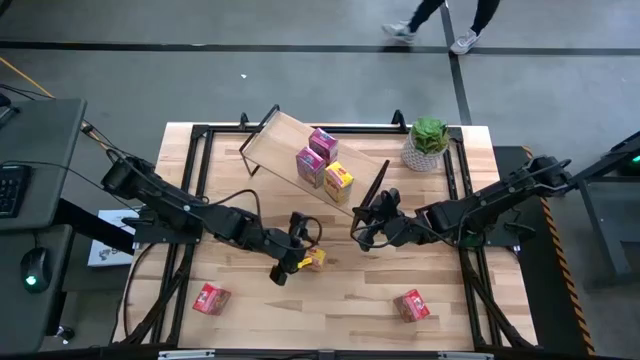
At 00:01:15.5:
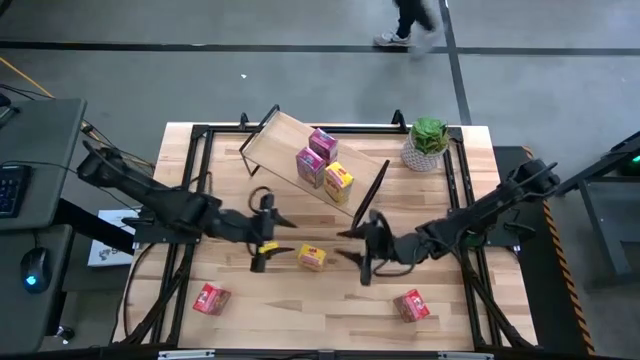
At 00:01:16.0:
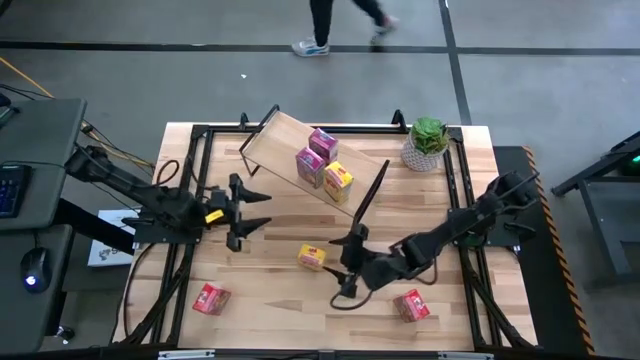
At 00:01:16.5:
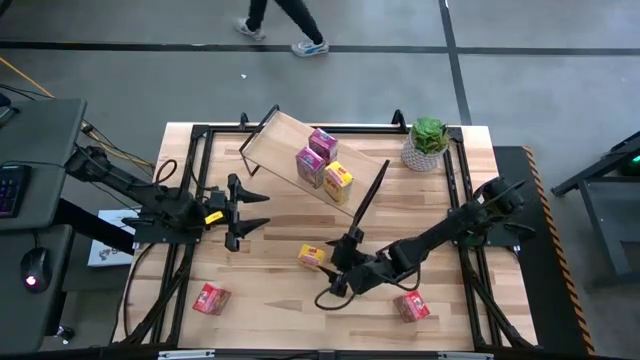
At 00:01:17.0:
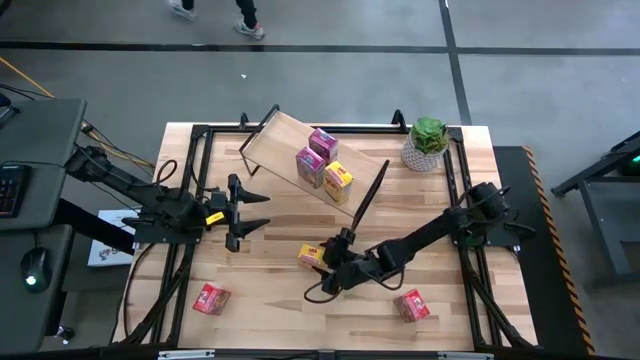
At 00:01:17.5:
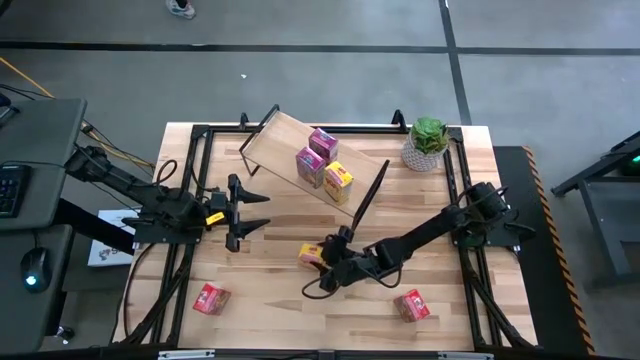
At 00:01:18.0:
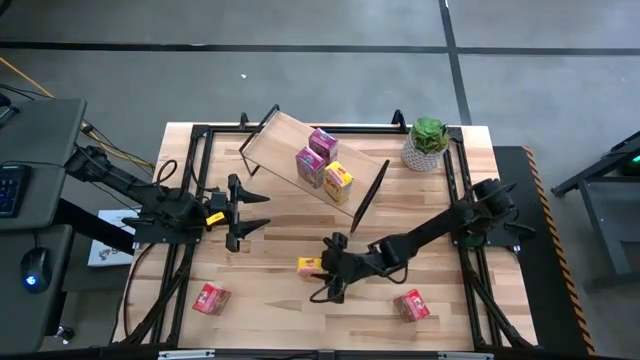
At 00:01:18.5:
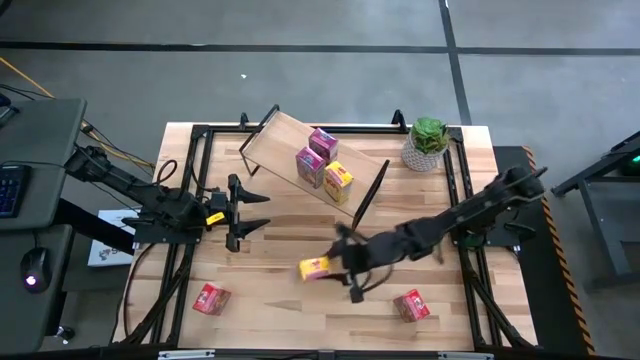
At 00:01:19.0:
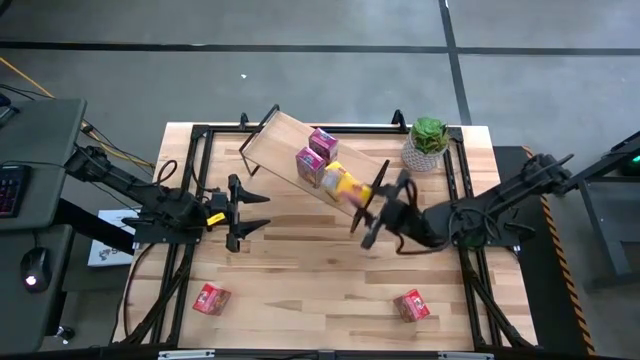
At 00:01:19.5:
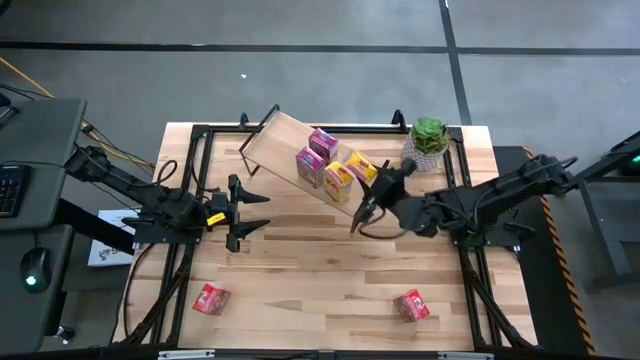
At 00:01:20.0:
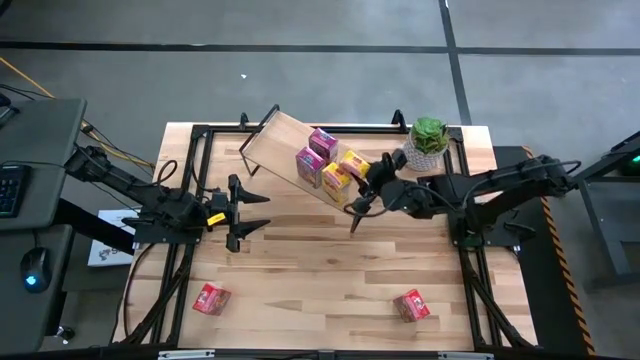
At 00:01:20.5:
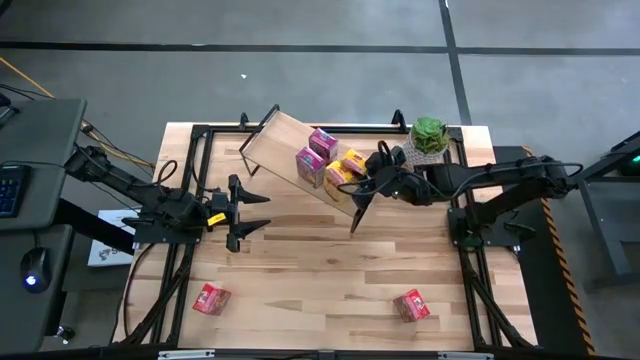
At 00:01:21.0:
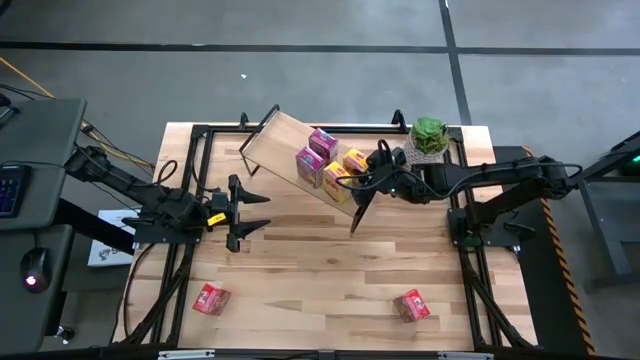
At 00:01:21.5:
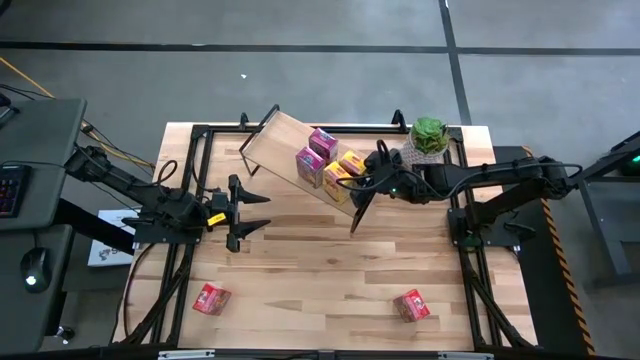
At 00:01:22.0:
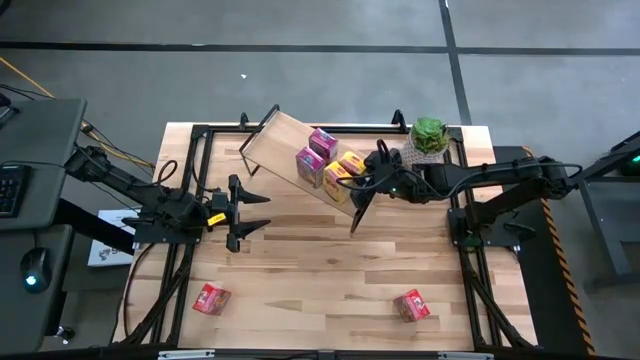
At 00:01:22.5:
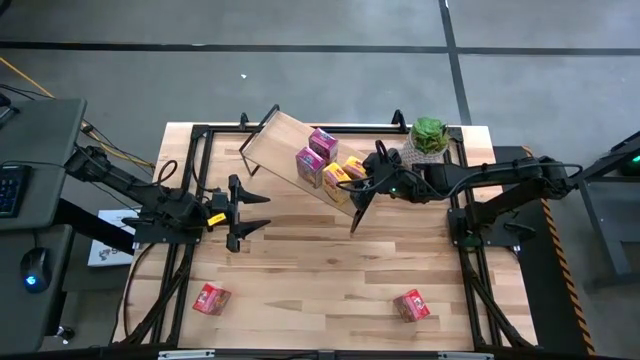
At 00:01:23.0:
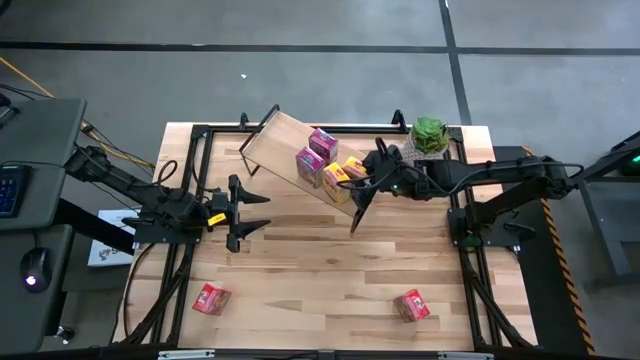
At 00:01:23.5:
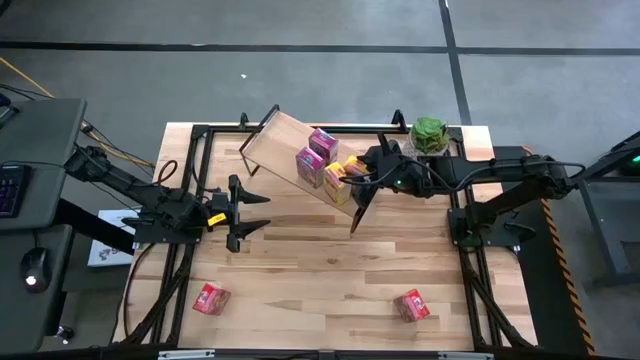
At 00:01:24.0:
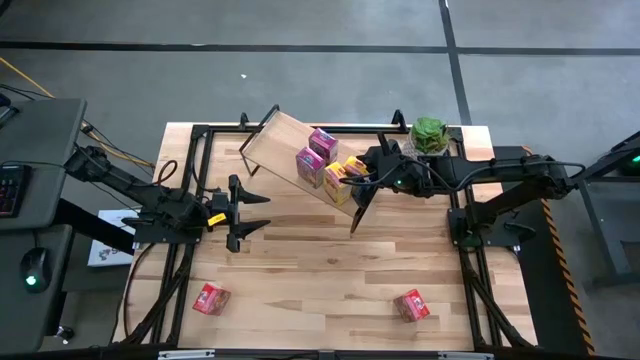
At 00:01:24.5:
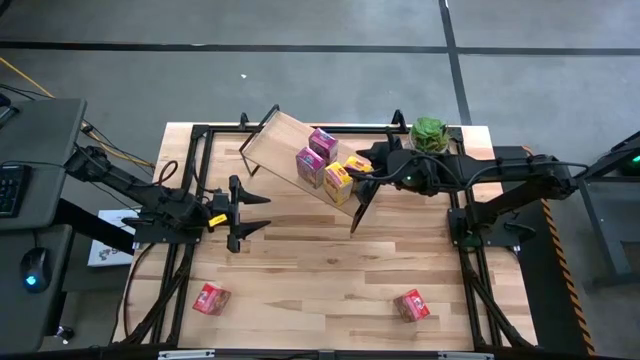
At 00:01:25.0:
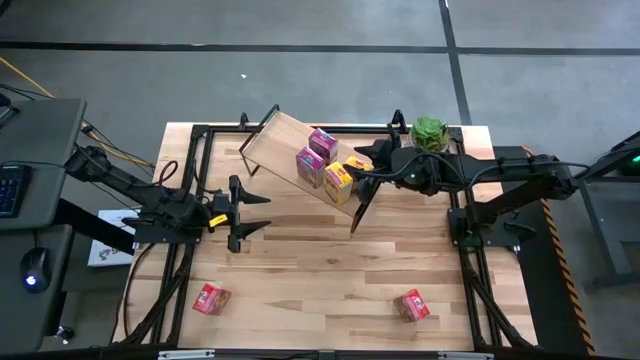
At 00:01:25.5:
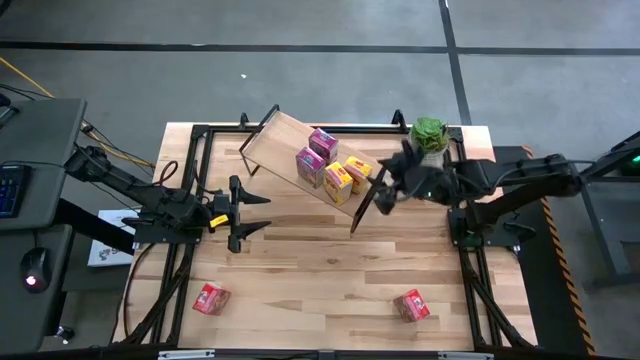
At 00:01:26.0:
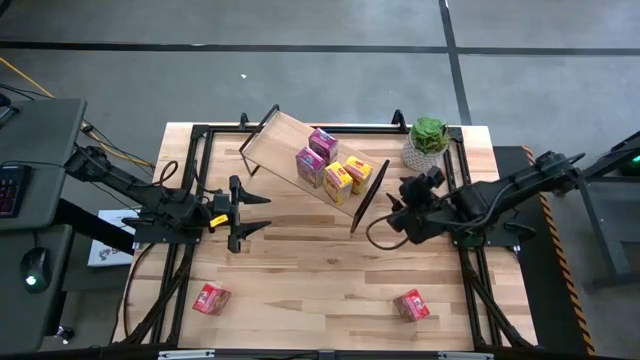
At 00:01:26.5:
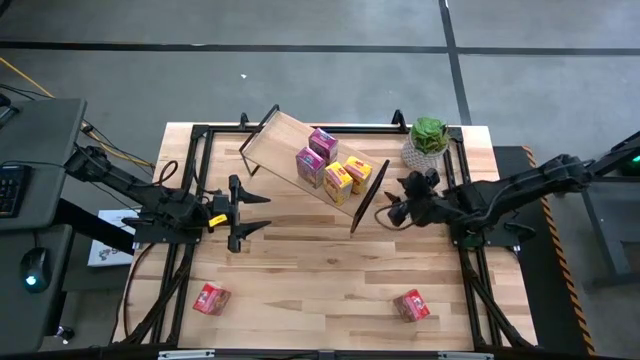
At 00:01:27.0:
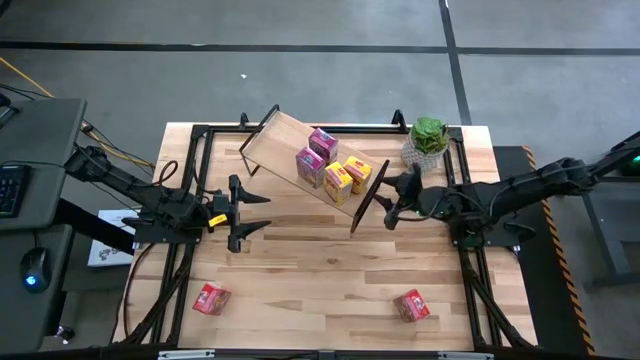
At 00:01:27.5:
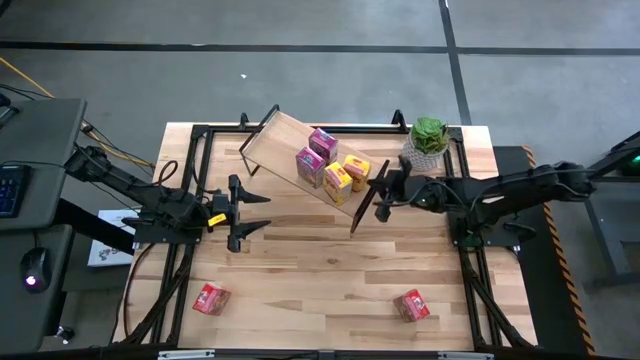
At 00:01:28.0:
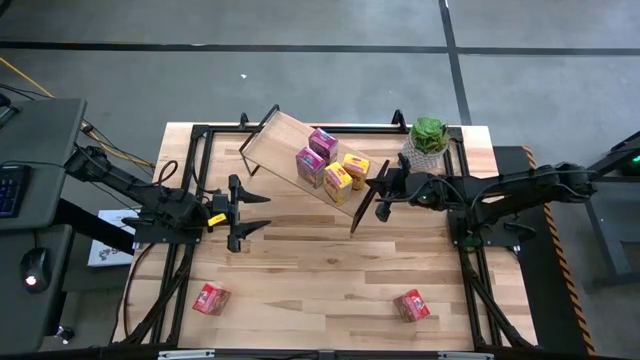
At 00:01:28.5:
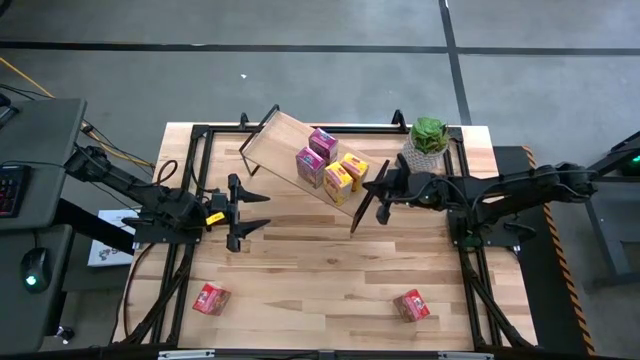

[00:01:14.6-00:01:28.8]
Task: Stack cereal on shelf
Put the yellow cereal box aligned with the other yellow cereal box on the shelf

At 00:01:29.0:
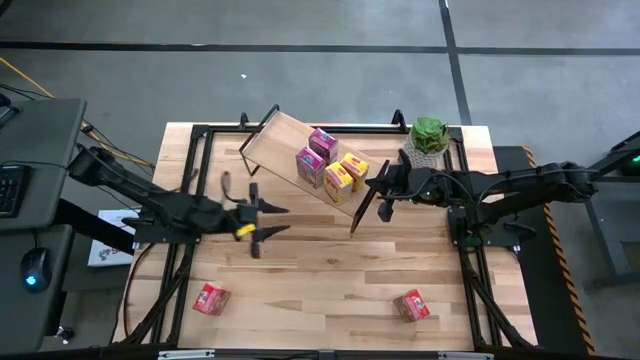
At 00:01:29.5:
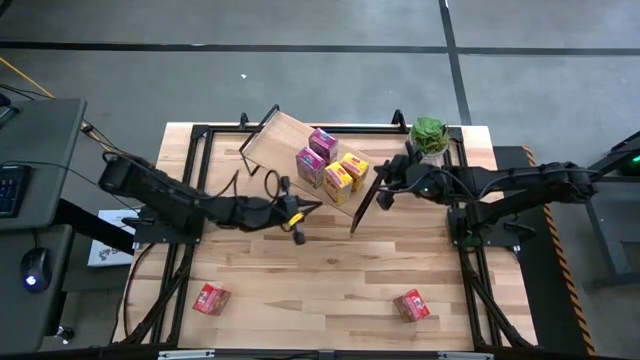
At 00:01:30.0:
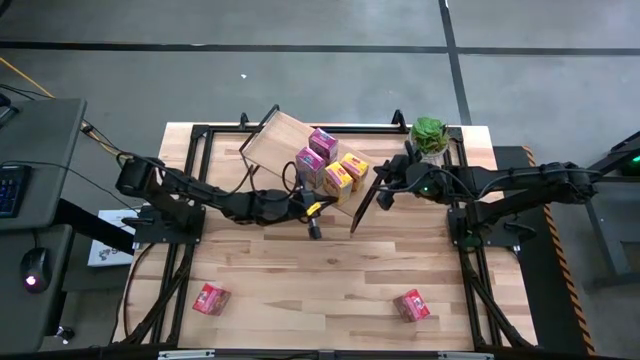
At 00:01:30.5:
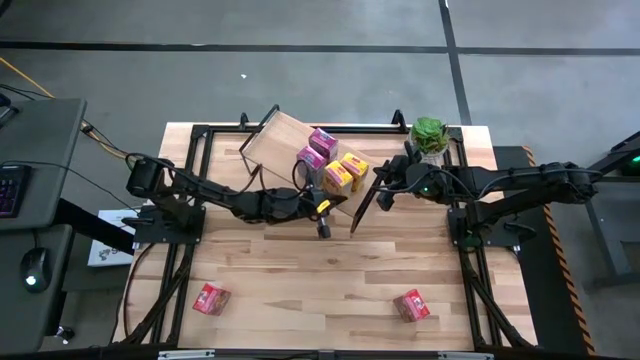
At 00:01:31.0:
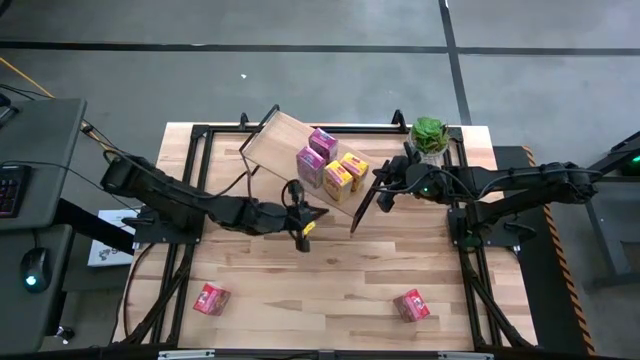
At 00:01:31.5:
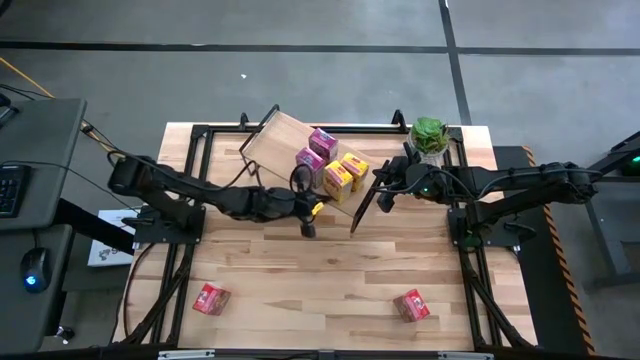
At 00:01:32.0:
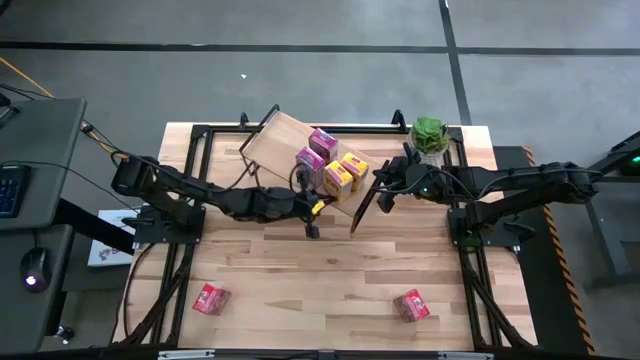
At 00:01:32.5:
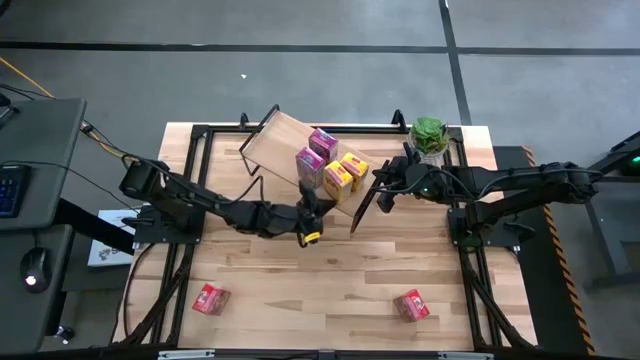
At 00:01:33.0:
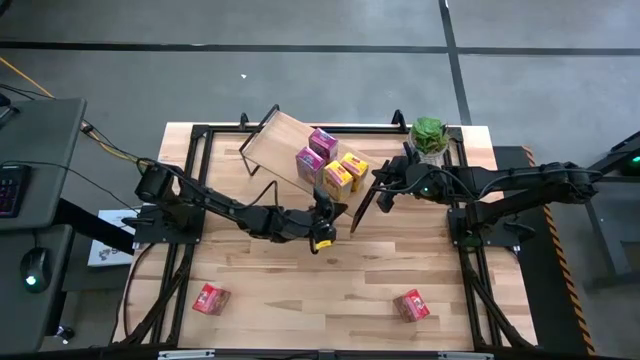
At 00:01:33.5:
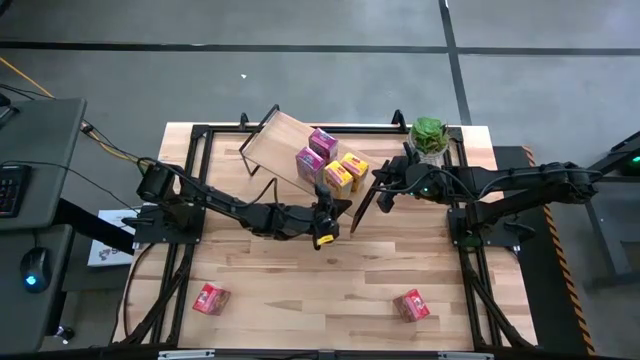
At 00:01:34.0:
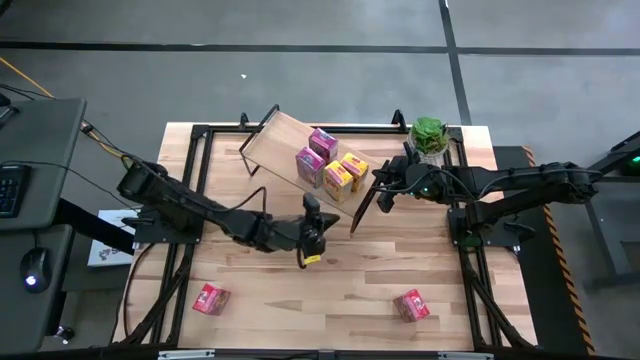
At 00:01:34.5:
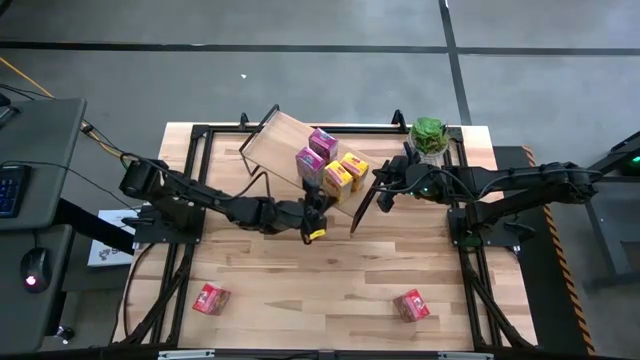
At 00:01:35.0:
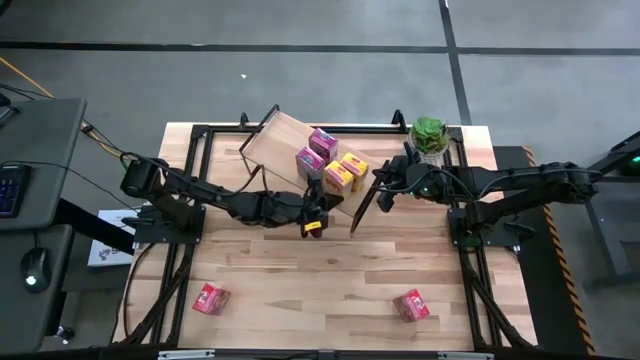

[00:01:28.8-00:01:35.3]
Adjust the yellow cereal box on the shelf
